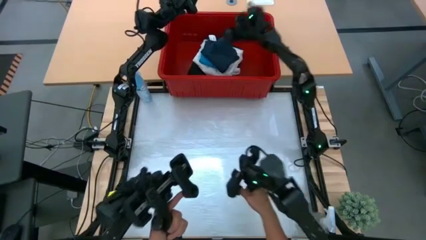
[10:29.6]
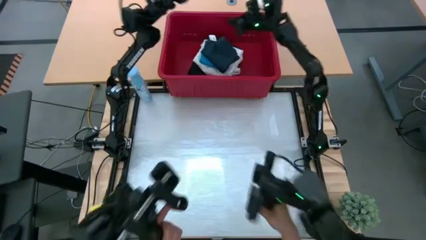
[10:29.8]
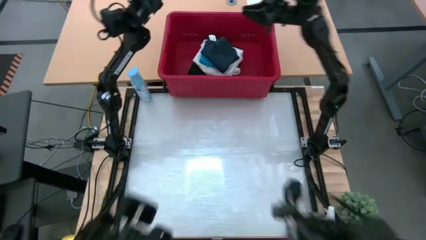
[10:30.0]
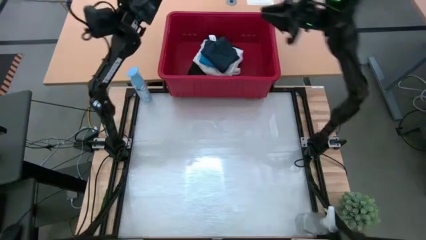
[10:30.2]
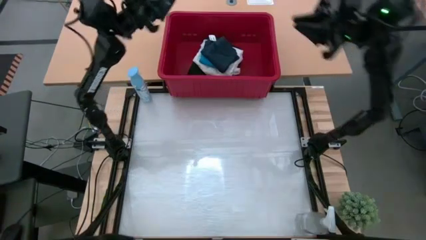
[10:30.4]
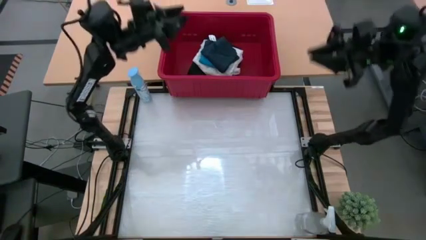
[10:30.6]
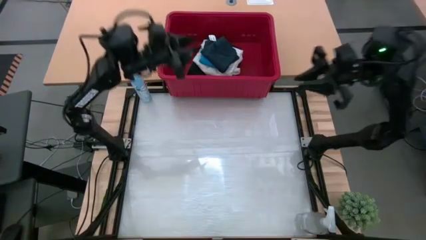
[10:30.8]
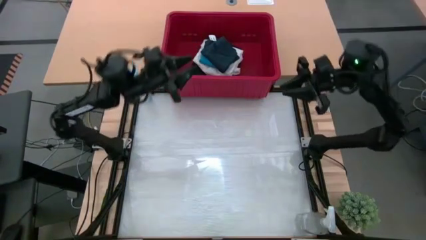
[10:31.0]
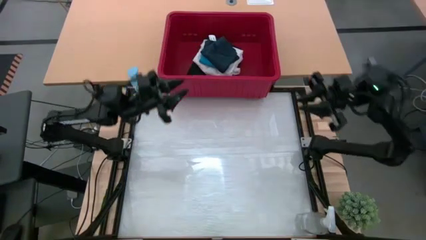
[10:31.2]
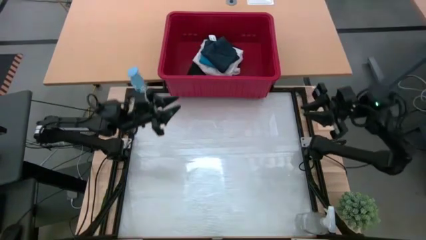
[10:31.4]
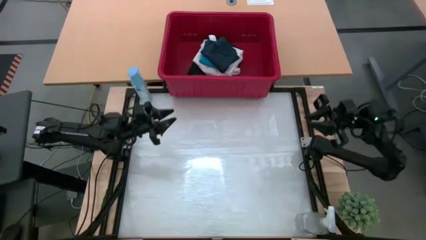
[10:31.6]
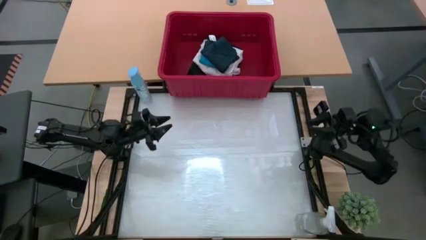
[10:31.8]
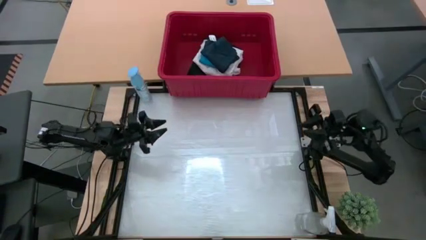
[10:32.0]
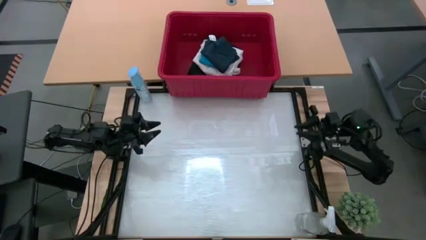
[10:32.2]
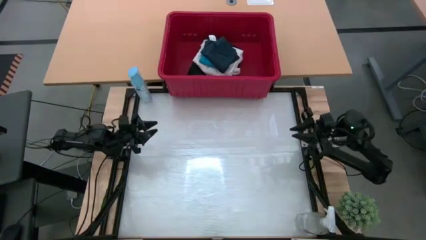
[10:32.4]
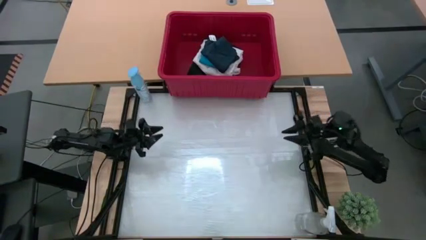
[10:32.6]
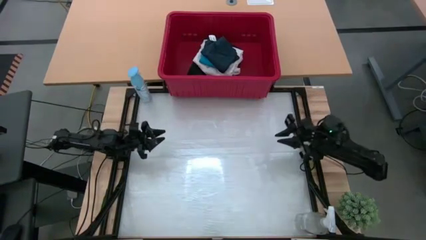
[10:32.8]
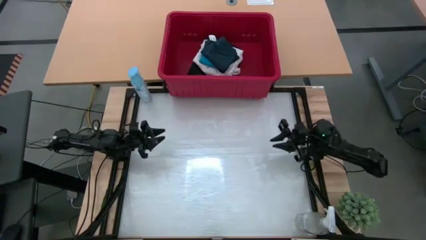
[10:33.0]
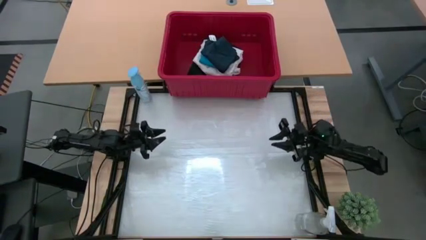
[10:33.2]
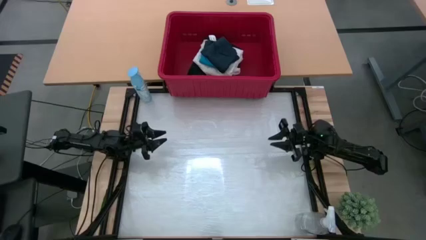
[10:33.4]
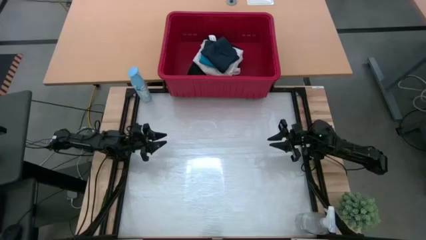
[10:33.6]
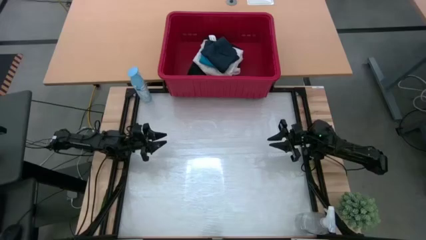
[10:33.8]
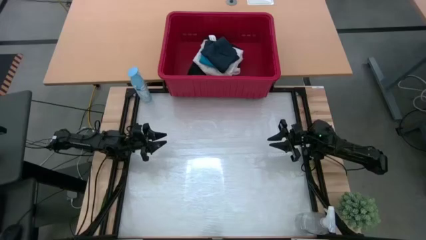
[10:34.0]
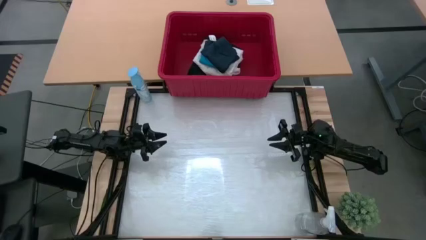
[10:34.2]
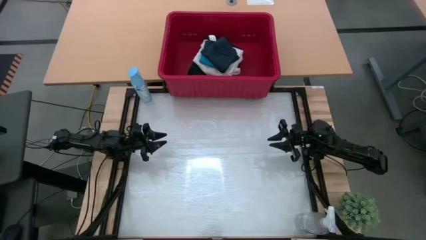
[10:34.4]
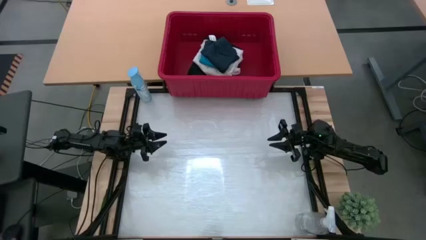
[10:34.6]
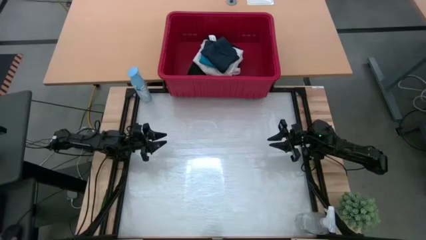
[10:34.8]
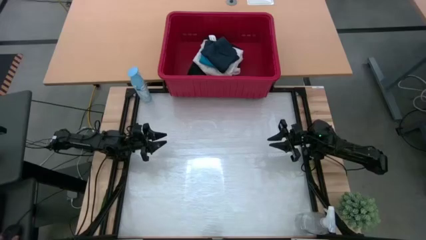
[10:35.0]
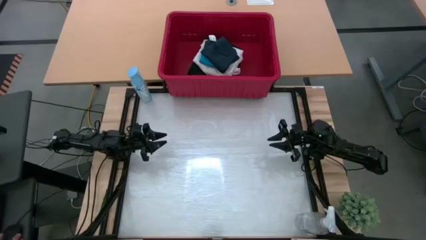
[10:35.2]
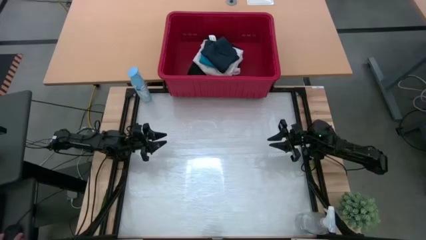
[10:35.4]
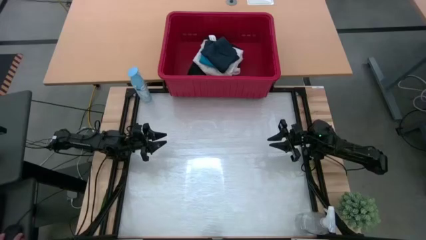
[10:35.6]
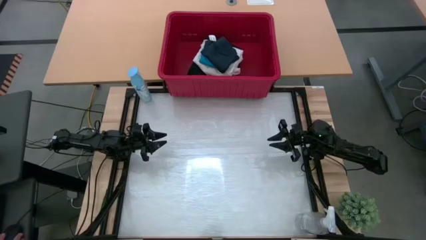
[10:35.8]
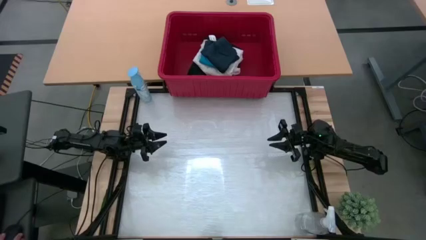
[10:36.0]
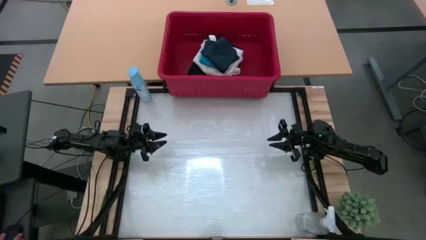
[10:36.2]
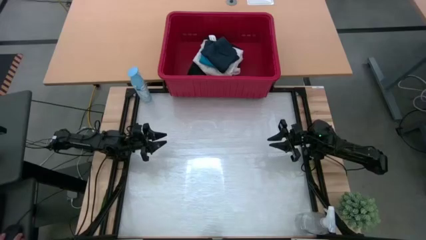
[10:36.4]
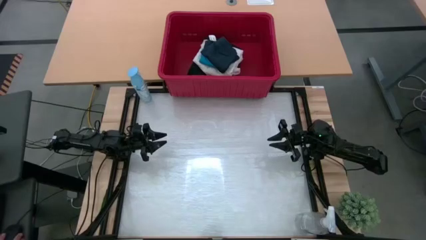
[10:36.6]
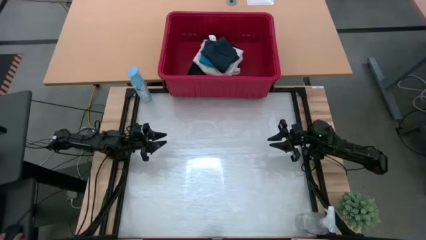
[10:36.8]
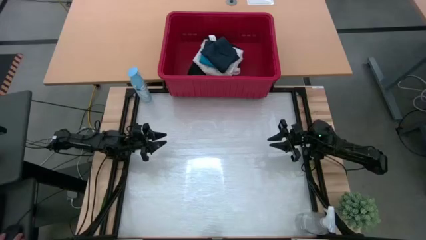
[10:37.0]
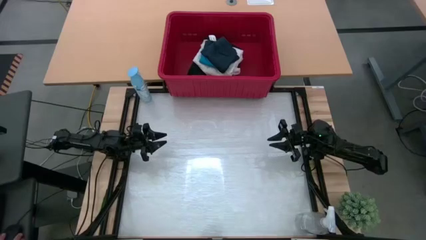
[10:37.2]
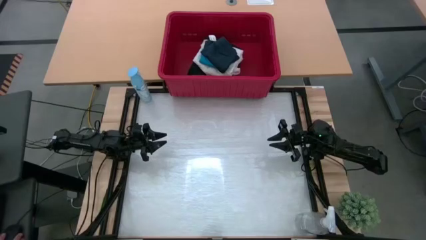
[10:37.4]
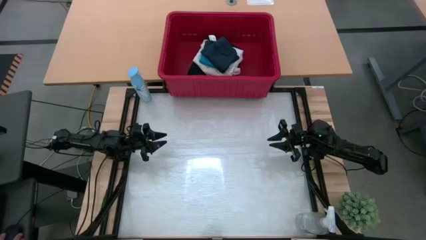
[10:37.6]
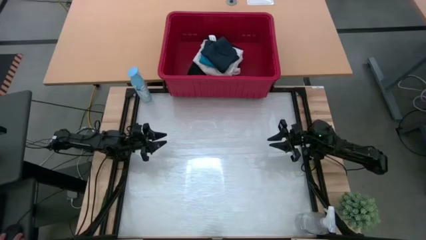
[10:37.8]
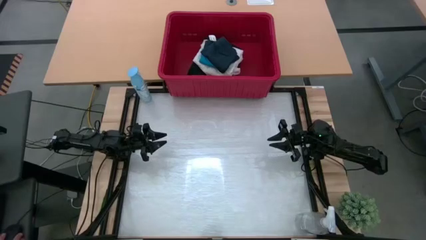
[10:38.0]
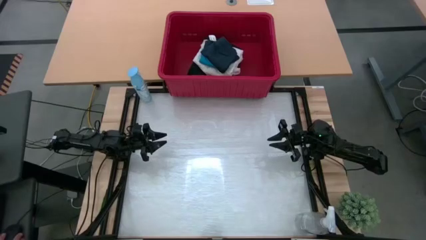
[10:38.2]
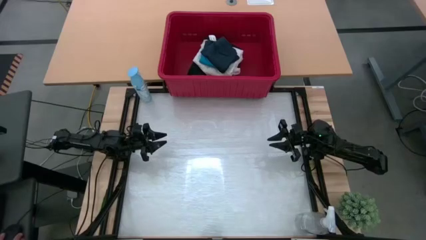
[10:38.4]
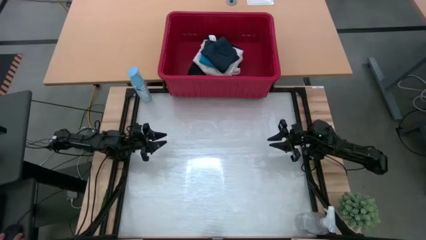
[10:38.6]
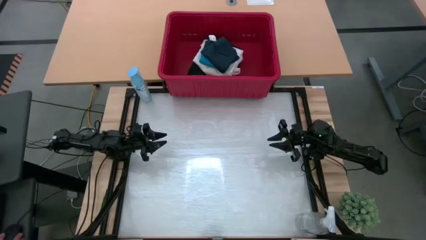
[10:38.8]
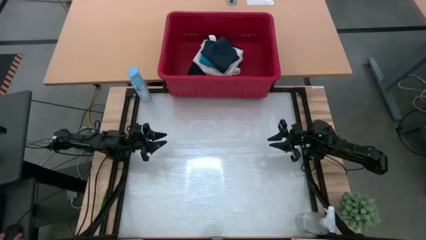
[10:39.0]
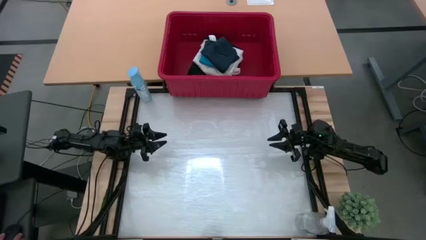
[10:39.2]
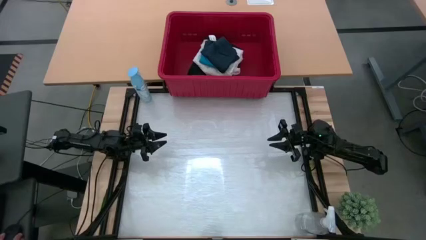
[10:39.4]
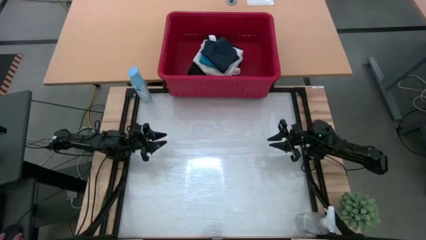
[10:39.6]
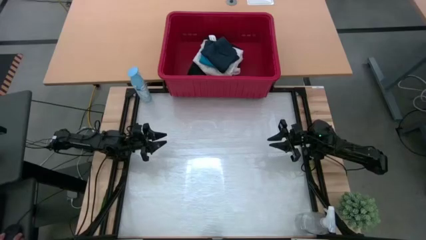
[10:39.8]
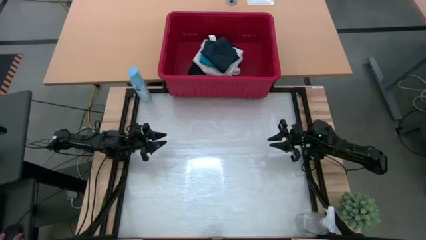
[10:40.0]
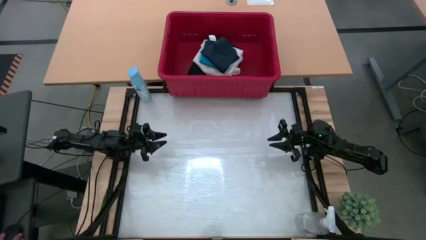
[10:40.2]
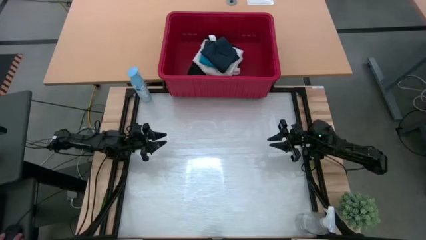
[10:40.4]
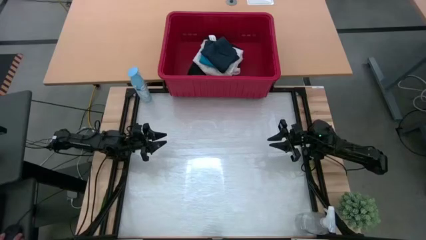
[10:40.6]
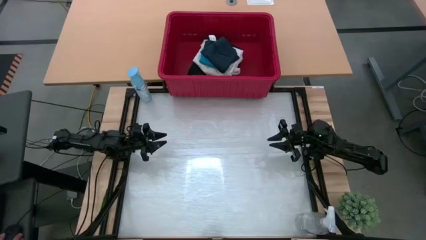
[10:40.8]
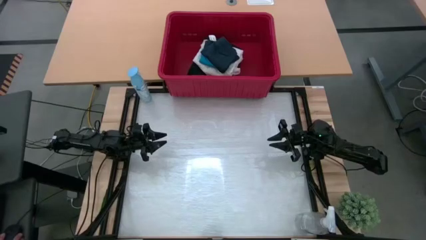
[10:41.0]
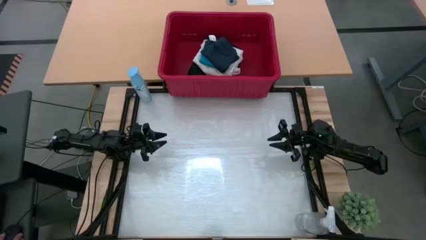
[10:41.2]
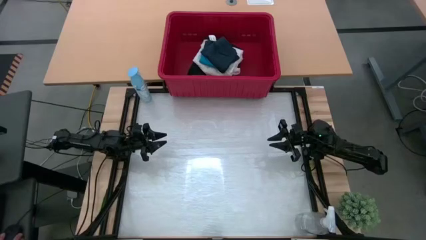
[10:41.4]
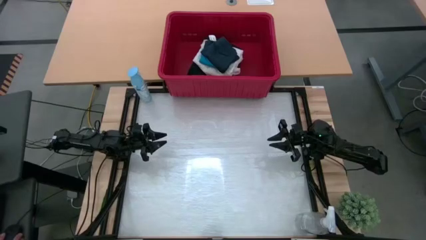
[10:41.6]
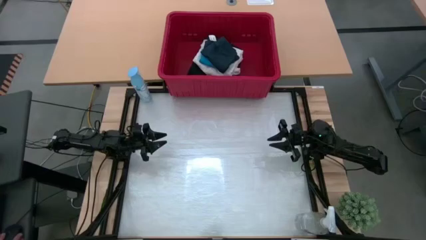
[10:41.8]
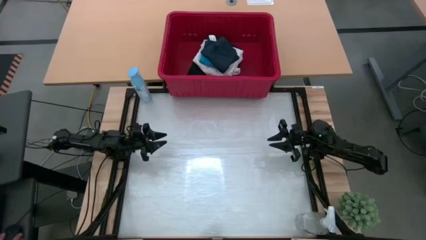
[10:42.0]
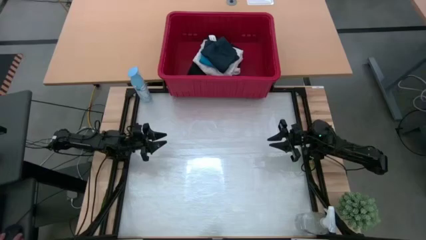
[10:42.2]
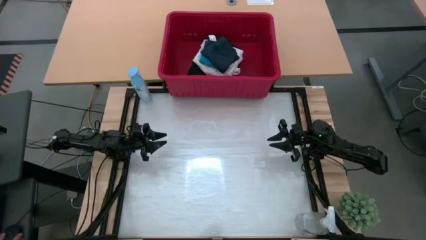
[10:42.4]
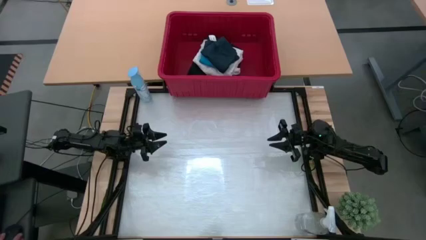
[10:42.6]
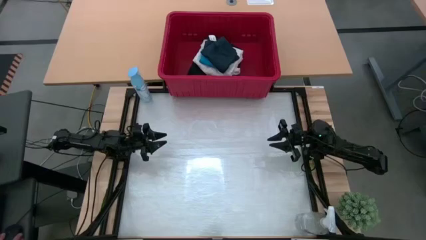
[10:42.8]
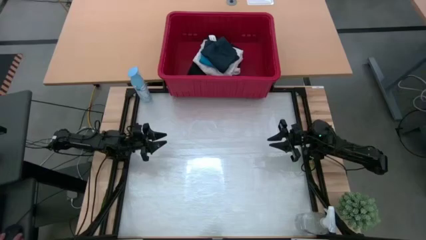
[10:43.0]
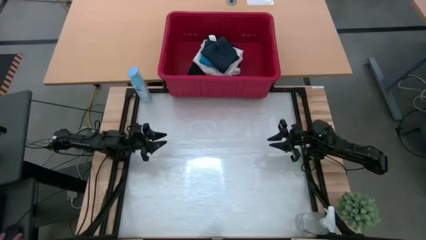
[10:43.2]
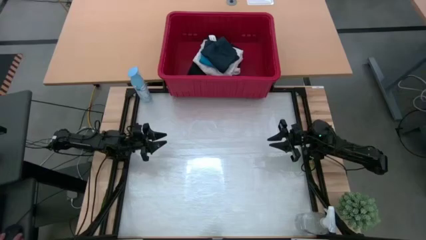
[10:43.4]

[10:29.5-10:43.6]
Task: Fold Laundry from Bin
Return to Home Position

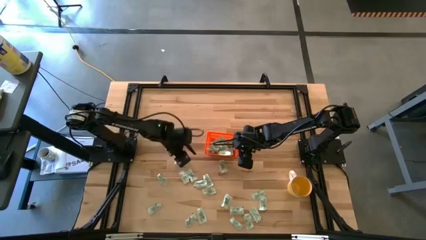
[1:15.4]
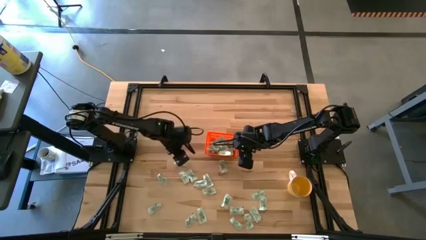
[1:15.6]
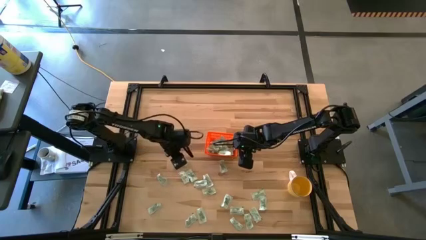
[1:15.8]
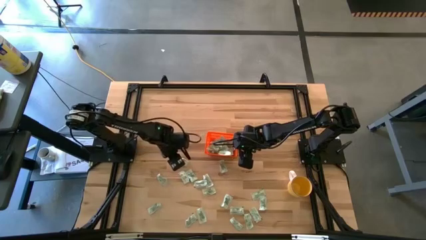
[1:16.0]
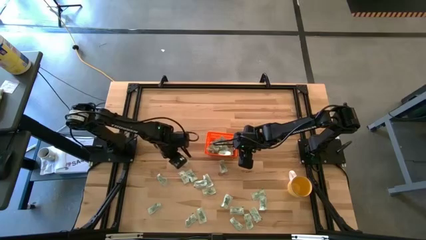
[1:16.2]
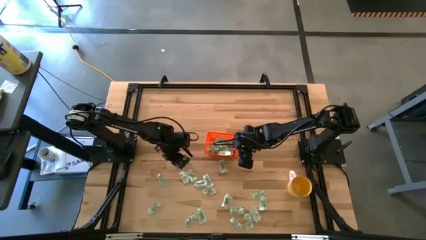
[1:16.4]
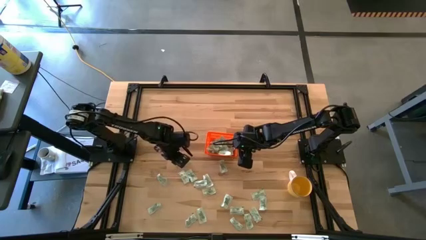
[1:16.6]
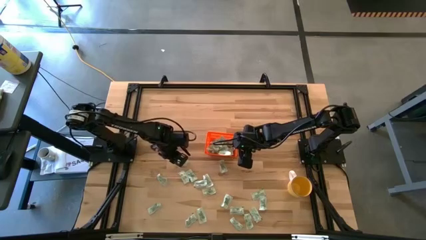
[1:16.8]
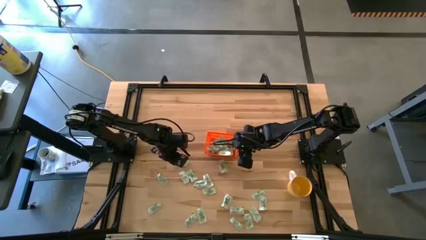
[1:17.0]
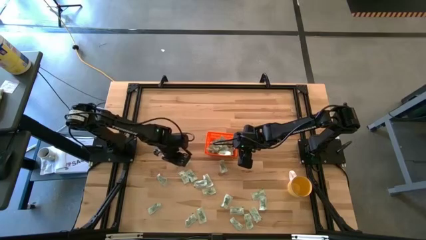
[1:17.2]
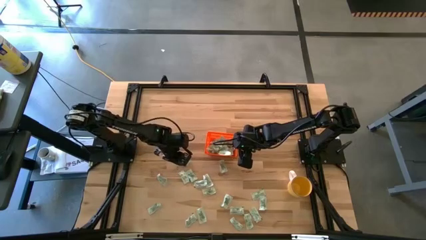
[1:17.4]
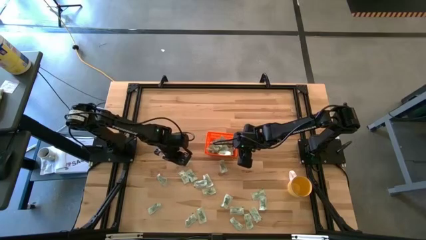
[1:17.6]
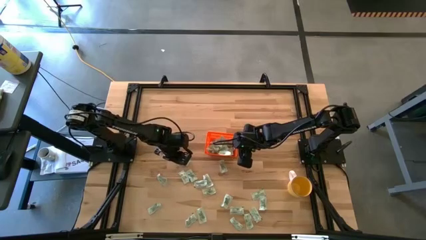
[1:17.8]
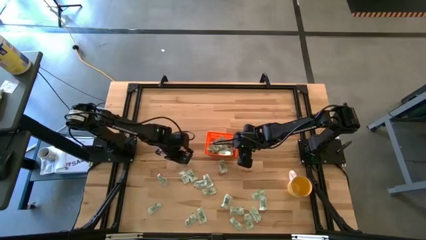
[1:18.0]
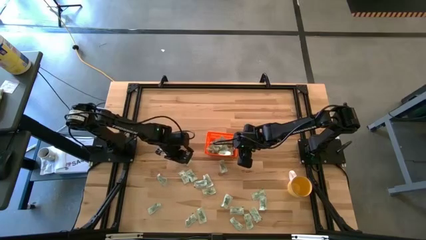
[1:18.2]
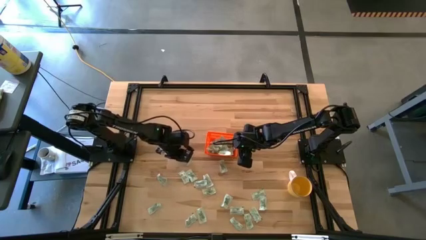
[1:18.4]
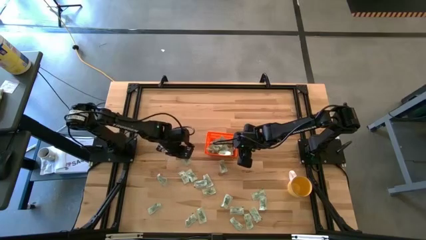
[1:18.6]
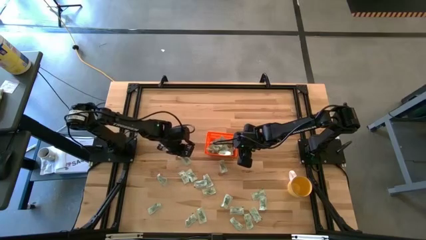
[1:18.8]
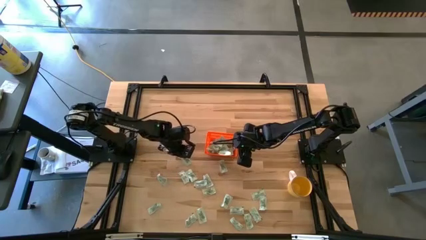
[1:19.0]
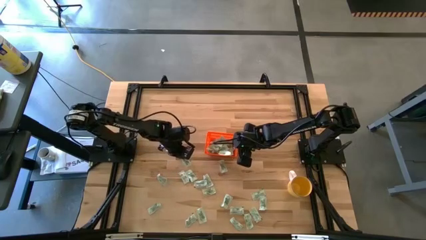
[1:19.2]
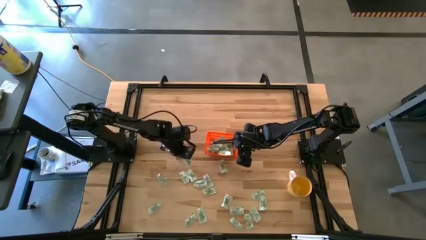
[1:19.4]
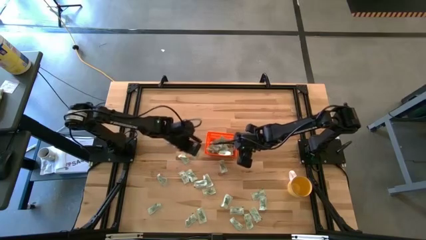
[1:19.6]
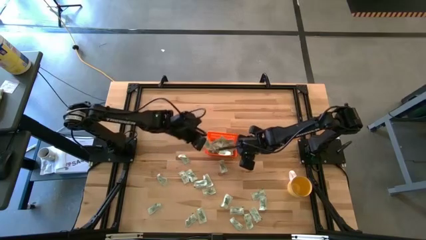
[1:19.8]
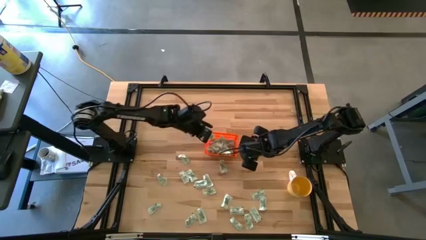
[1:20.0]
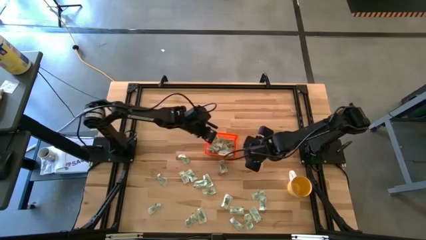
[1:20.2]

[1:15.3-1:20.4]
Task: Pick and place Stevia / Truvia into bins
Put the light green stevia packet into the orange bin
